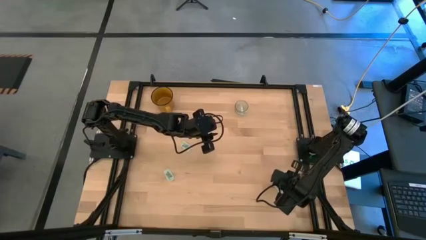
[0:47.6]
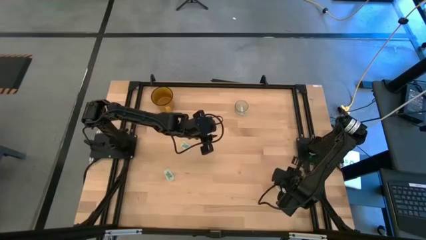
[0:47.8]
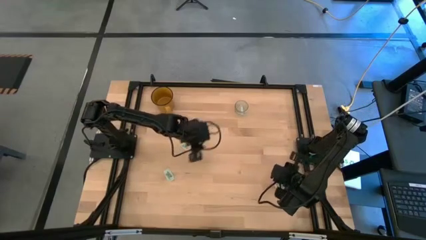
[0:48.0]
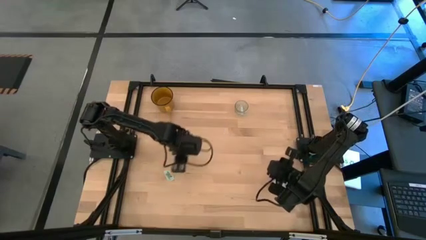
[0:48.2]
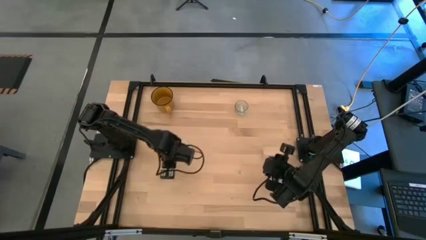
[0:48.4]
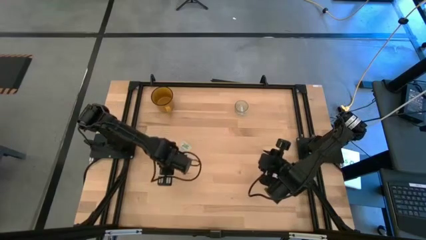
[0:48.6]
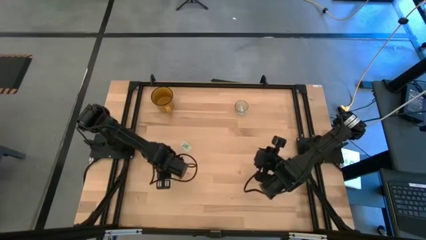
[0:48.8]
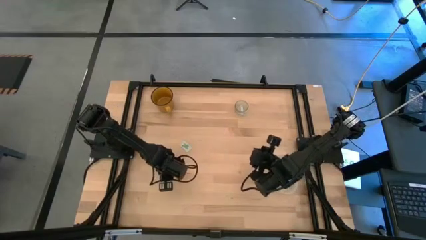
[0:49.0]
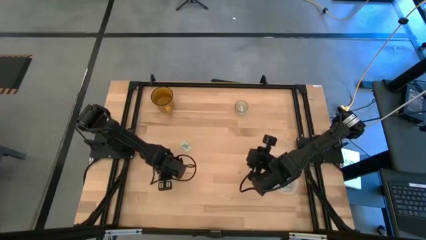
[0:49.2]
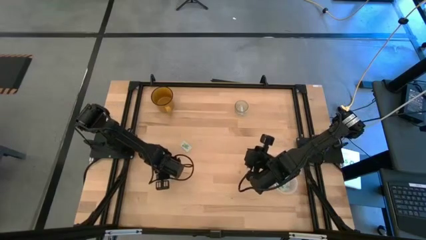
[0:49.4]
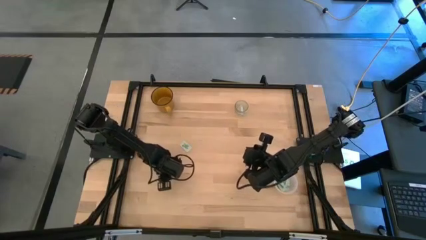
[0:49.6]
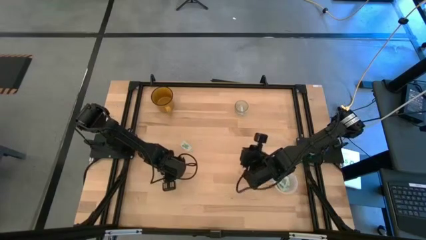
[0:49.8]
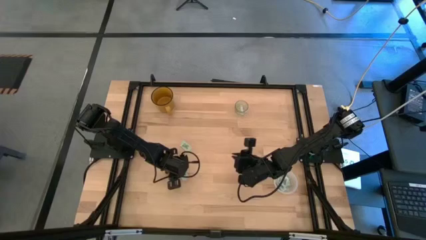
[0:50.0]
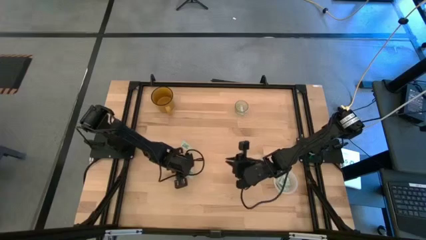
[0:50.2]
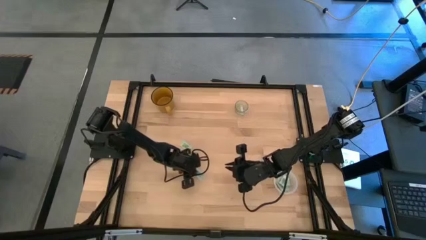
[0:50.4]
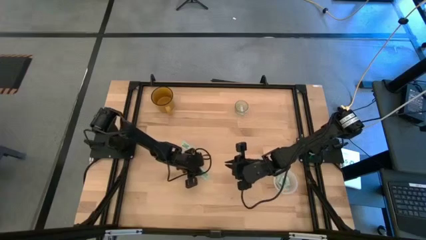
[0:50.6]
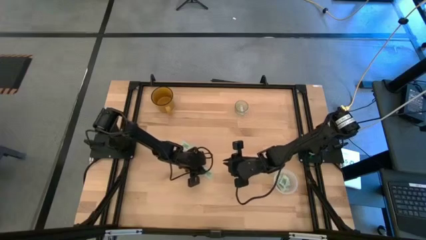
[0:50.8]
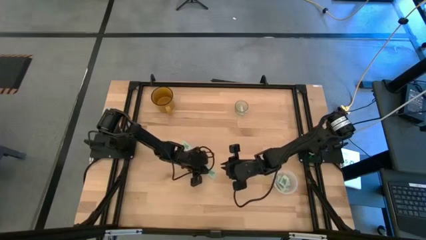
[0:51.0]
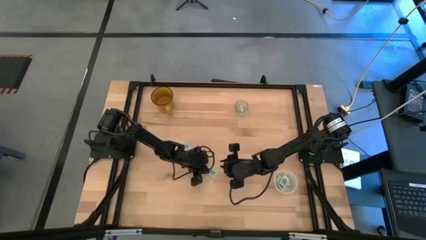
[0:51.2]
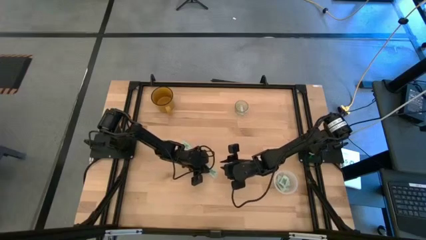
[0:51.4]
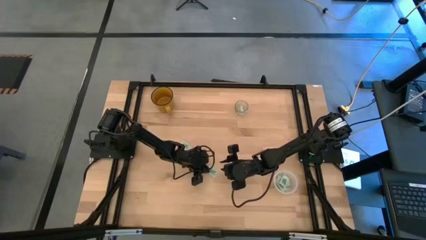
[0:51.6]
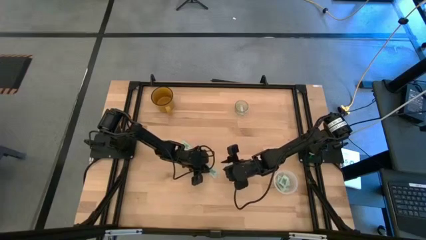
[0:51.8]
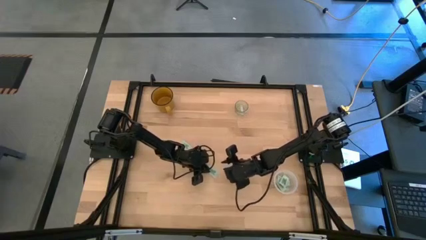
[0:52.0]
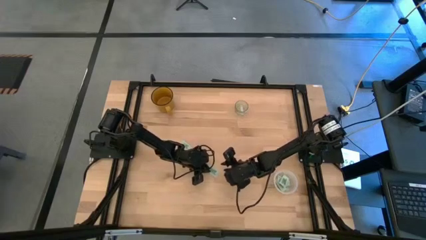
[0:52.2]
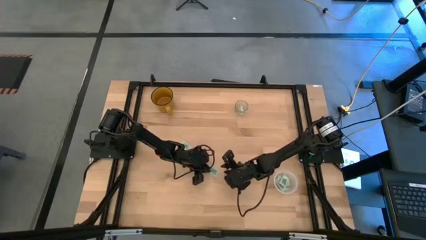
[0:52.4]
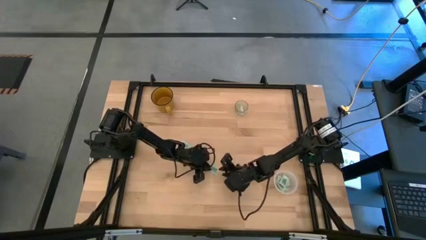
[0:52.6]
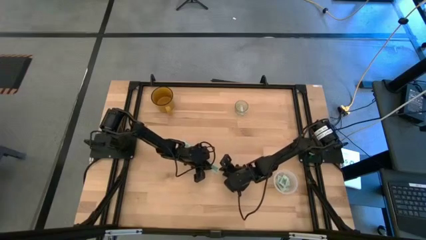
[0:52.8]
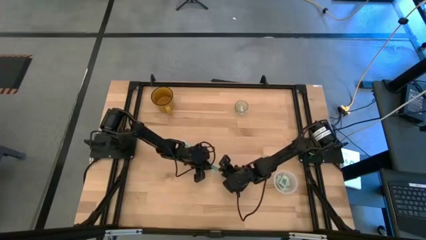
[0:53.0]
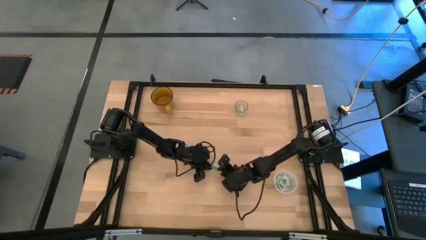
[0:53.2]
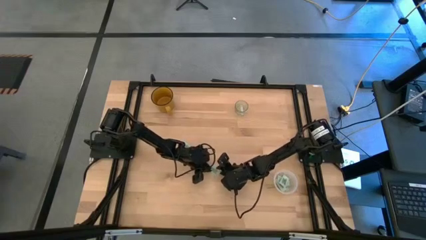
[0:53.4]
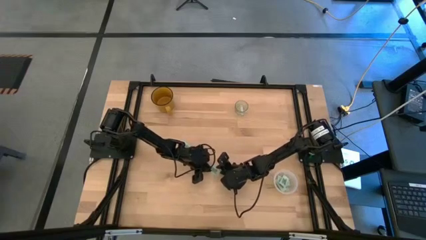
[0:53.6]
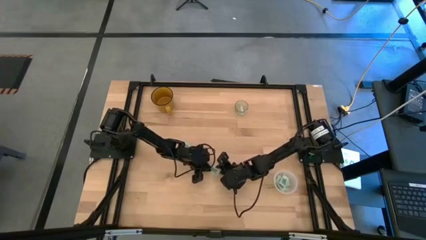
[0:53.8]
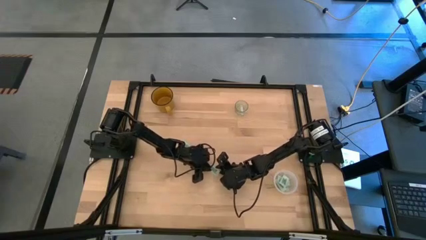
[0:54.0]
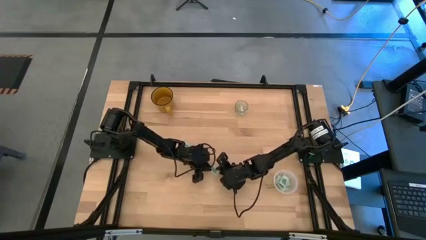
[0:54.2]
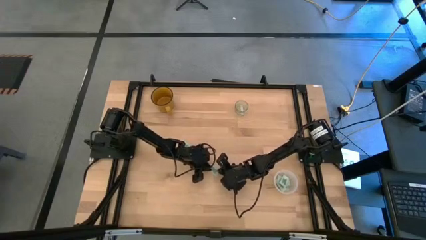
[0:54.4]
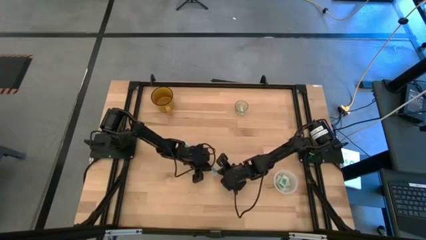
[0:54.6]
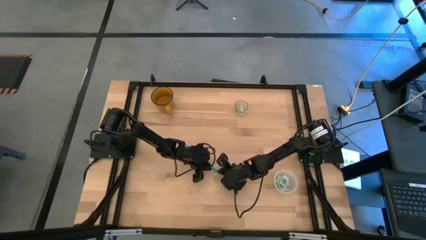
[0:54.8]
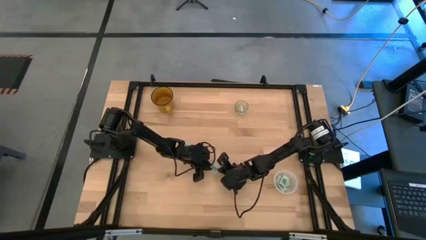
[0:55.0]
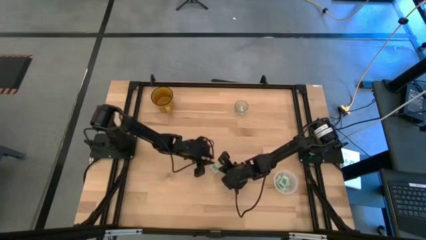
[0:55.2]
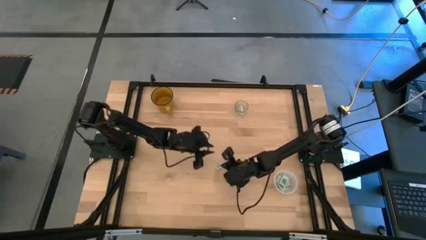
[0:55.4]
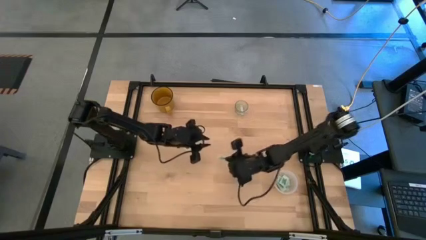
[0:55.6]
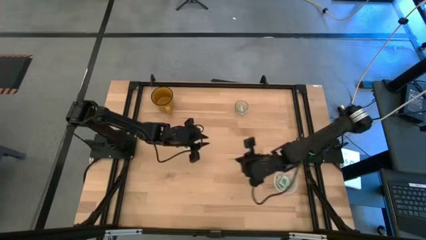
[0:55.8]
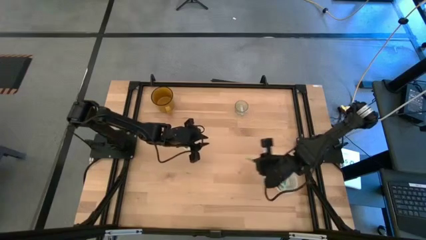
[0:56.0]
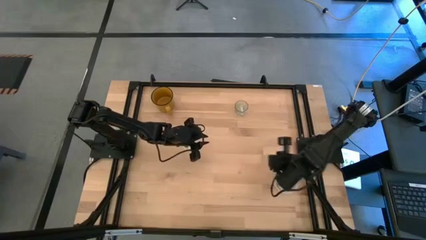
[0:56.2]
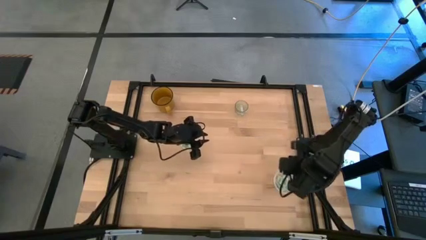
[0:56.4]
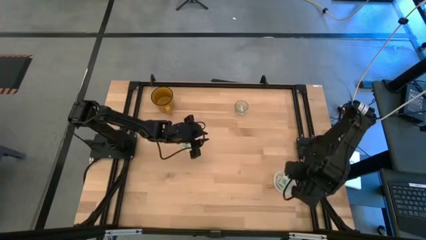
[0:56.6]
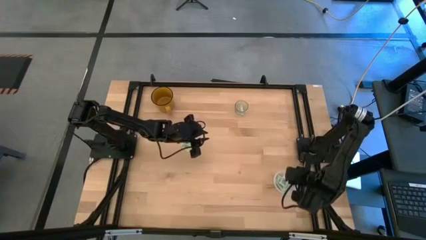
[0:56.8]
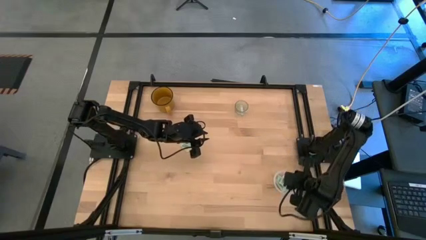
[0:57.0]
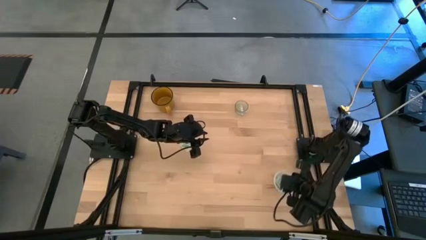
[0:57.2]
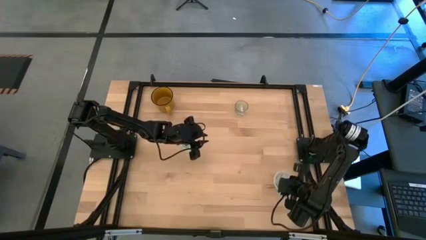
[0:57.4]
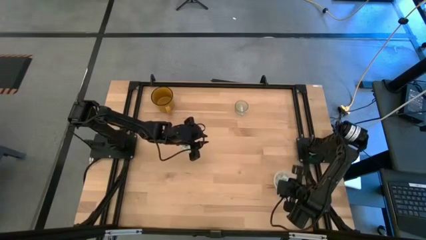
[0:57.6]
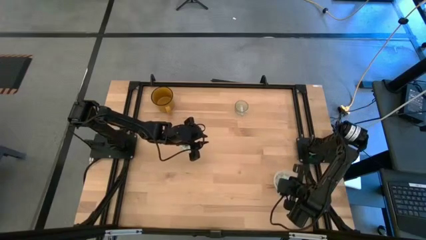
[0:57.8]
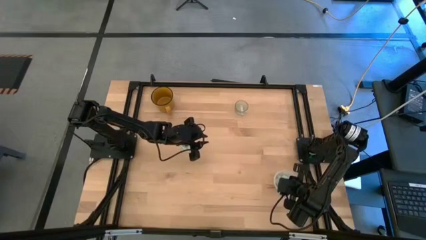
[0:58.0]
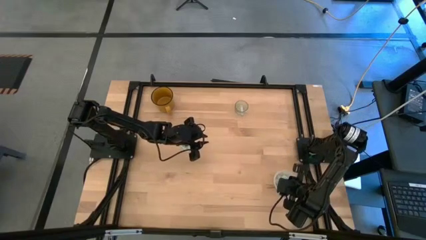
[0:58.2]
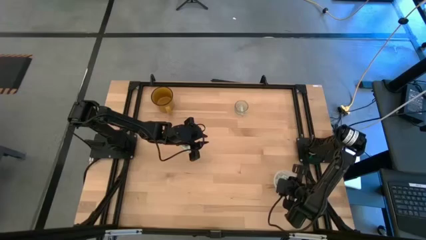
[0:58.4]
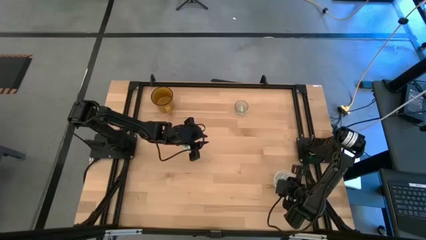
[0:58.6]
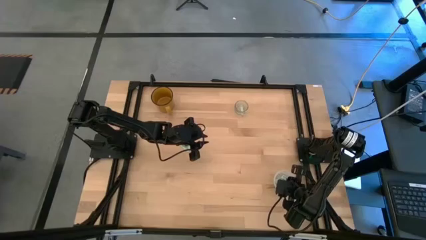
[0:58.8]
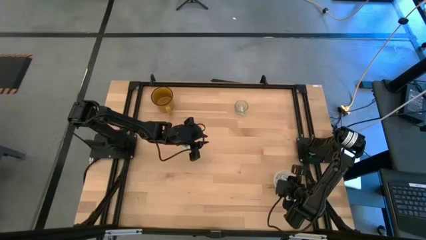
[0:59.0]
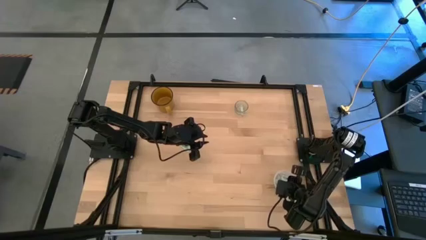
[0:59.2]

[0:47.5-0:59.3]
Task: Pick and place Stevia / Truvia into bins
Put the stevia packet into the transparent container

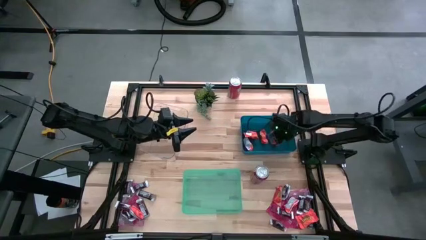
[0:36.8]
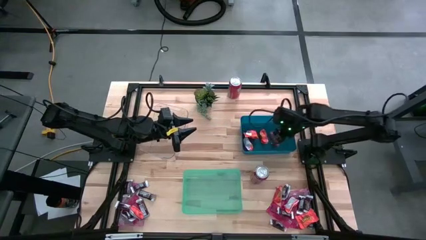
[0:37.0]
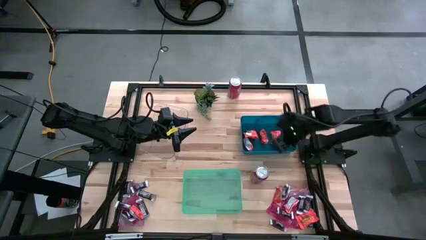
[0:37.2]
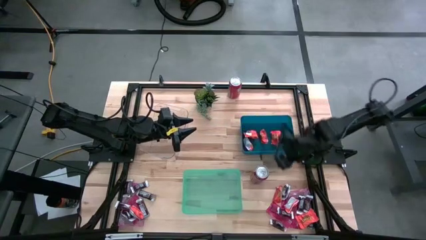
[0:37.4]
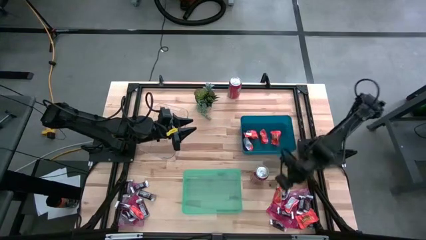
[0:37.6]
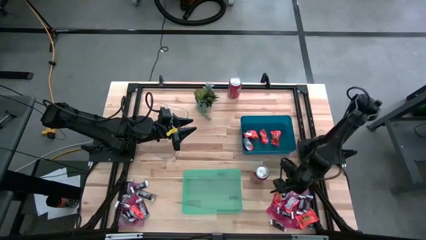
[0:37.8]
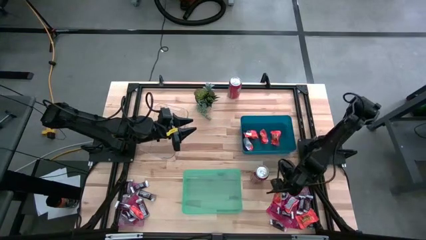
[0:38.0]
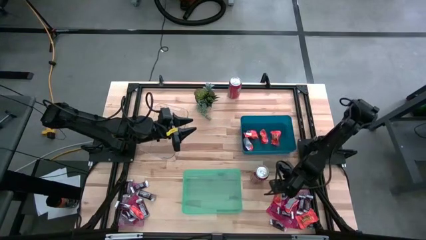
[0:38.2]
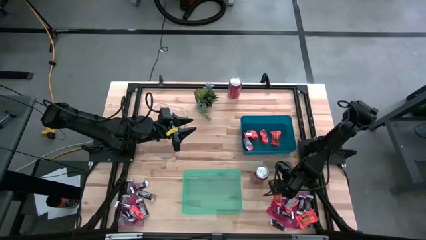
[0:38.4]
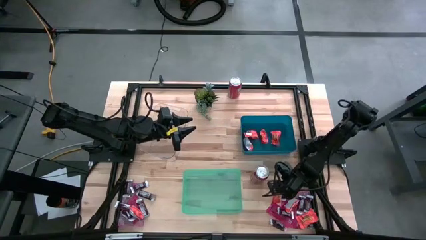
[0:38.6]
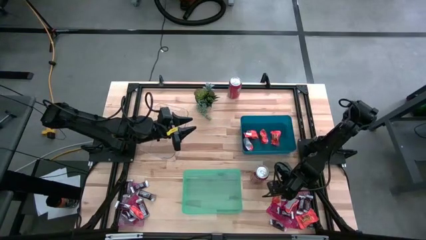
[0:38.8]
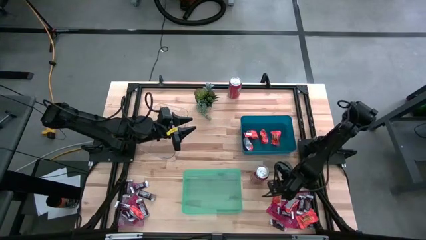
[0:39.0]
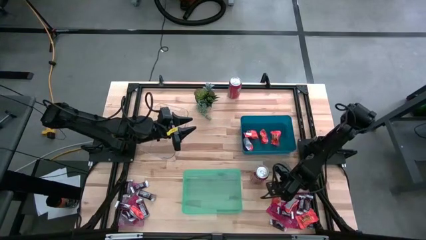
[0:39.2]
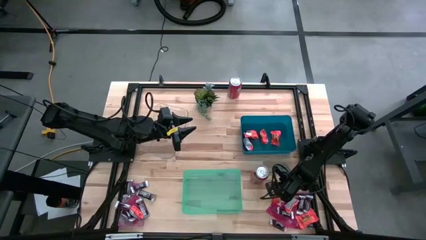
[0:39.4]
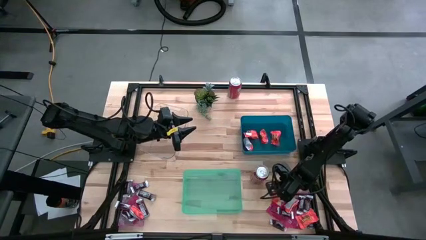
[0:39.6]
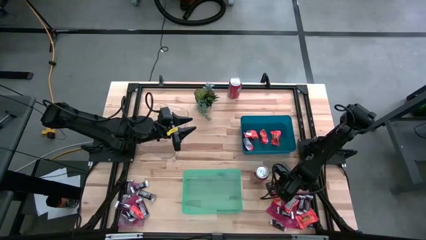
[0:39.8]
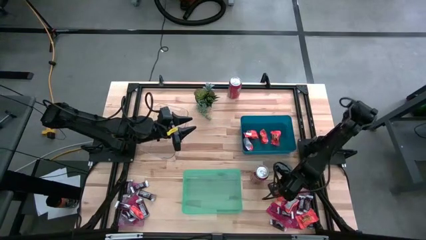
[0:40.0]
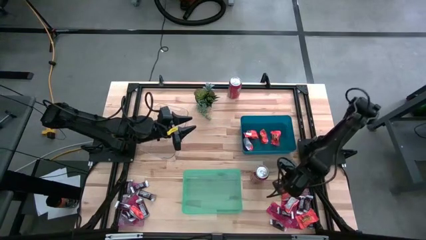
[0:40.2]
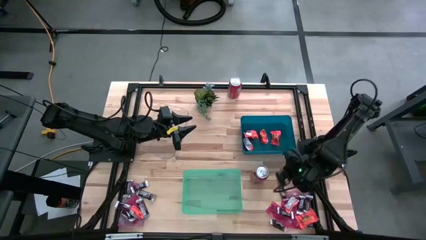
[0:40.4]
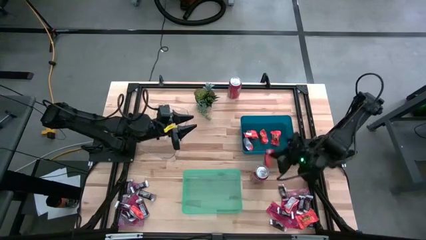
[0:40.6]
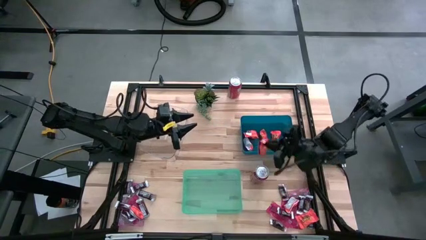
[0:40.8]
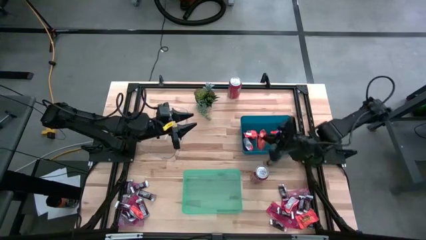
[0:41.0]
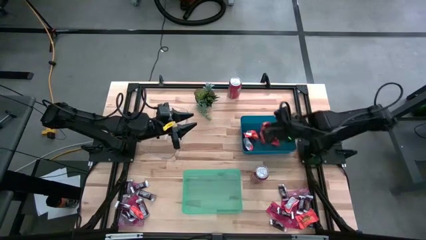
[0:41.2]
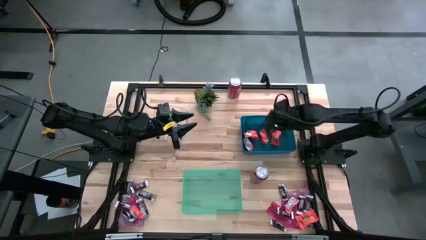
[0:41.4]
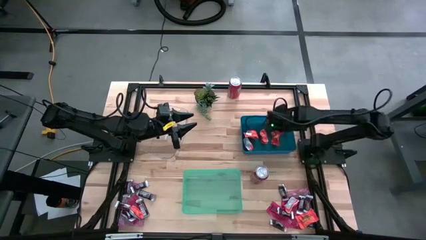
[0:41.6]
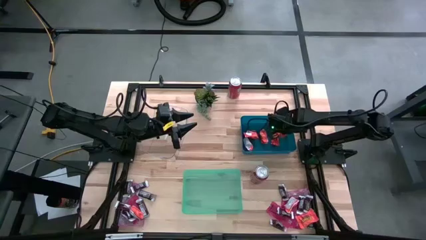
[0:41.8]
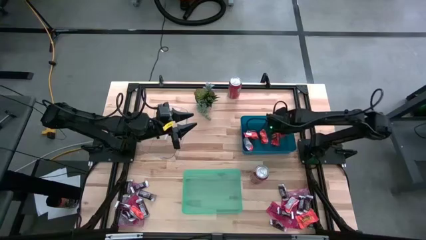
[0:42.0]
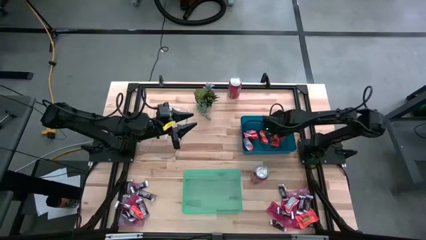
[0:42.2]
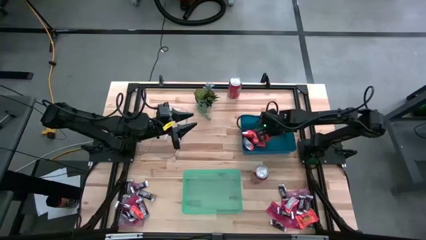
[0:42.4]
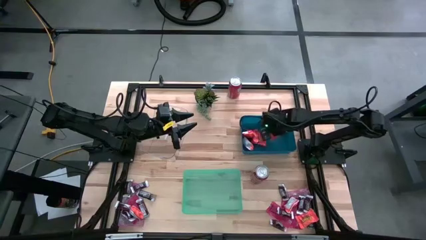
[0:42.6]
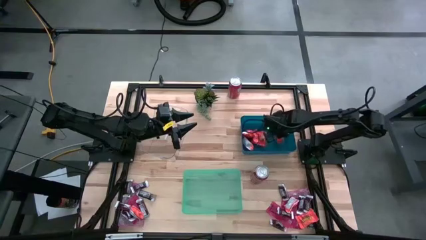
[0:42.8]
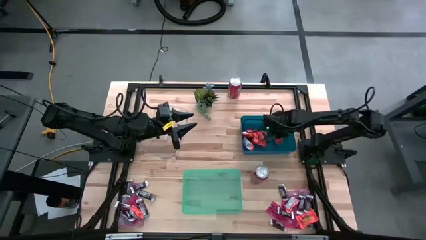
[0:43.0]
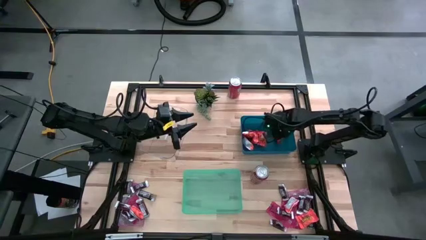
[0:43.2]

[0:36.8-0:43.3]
Task: Sort candy
Put the orange chocolate into the blue bin
